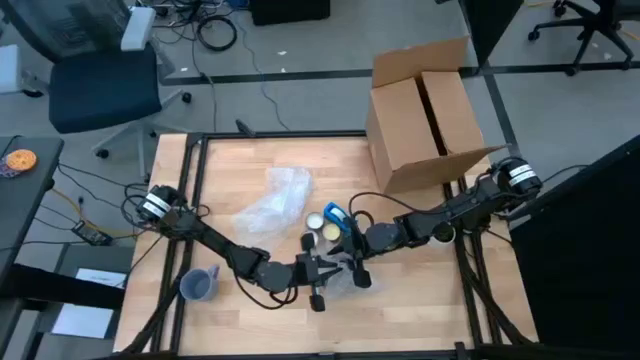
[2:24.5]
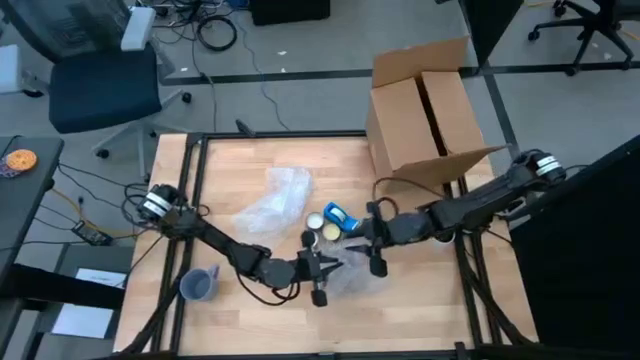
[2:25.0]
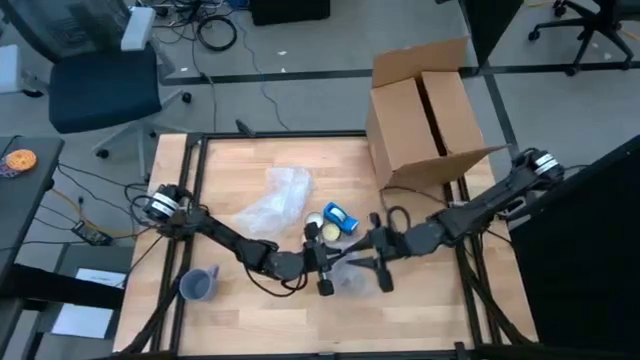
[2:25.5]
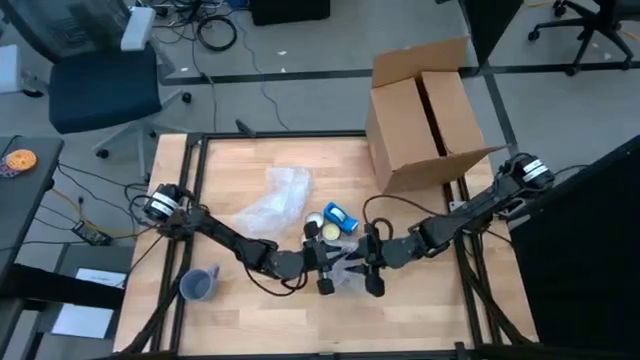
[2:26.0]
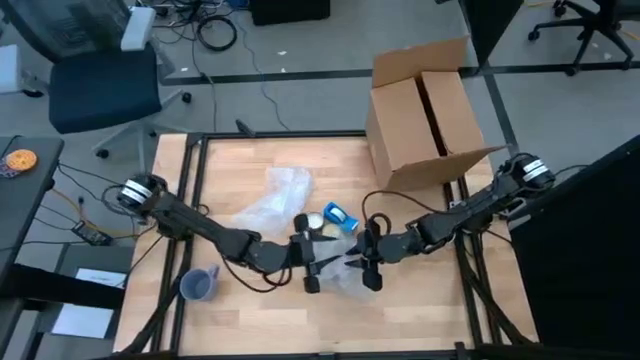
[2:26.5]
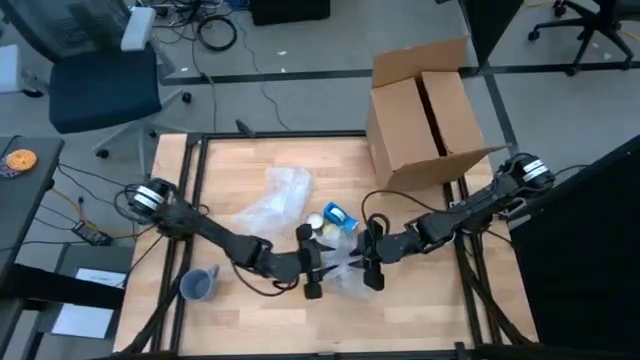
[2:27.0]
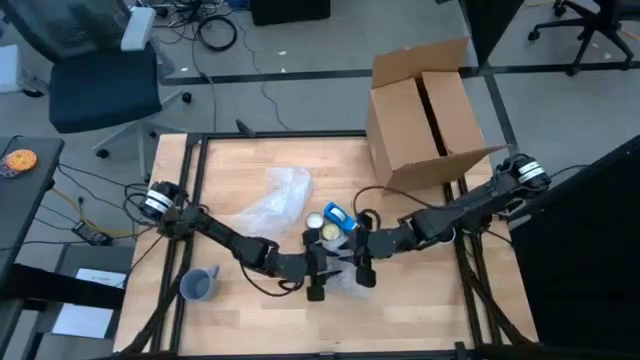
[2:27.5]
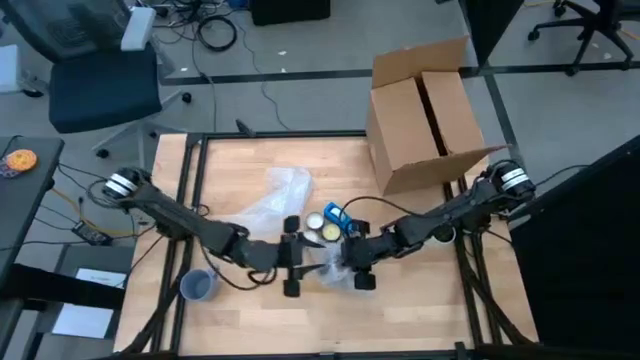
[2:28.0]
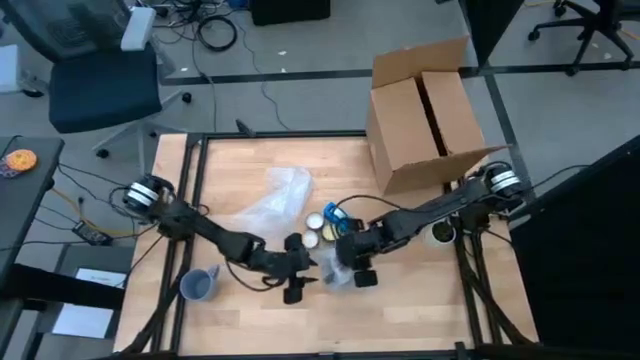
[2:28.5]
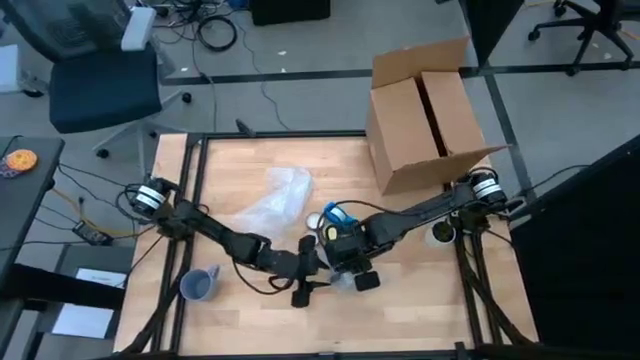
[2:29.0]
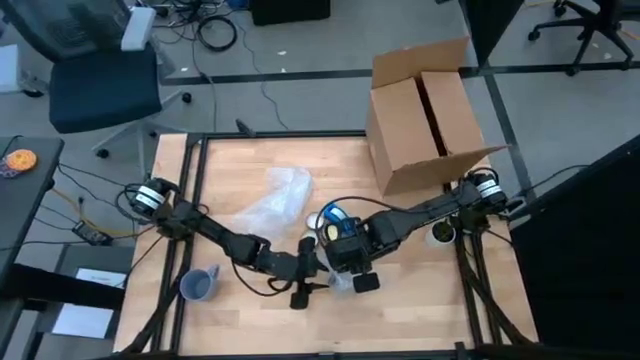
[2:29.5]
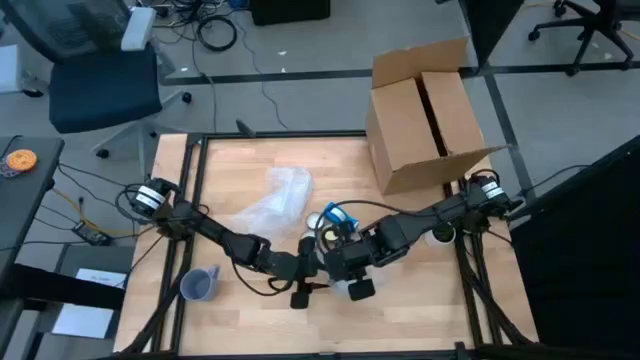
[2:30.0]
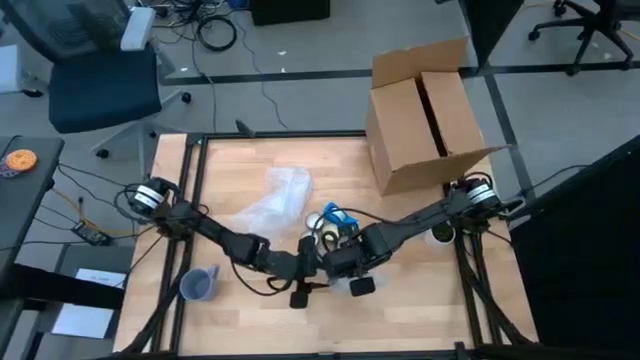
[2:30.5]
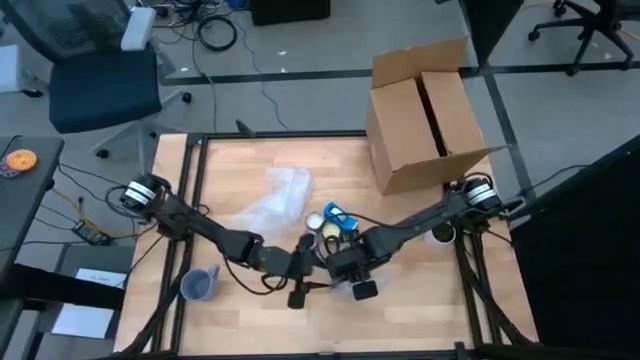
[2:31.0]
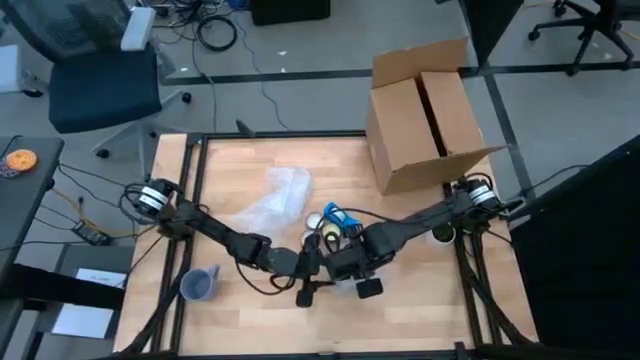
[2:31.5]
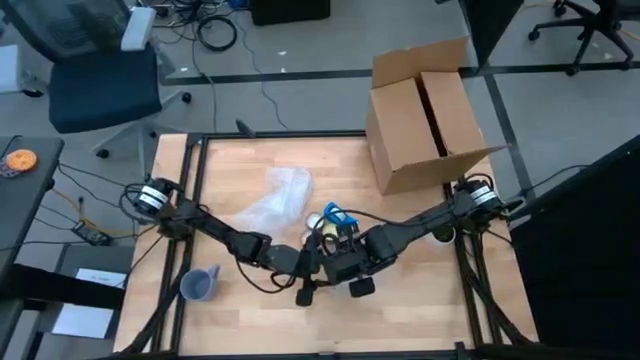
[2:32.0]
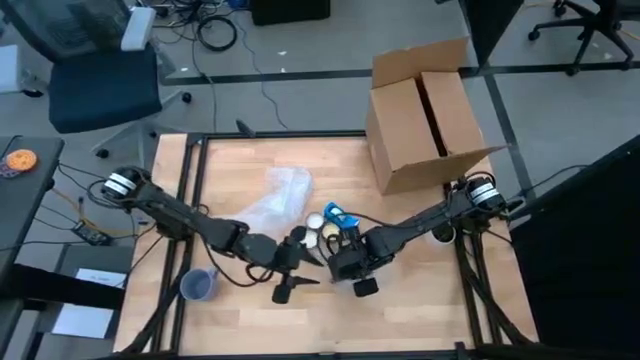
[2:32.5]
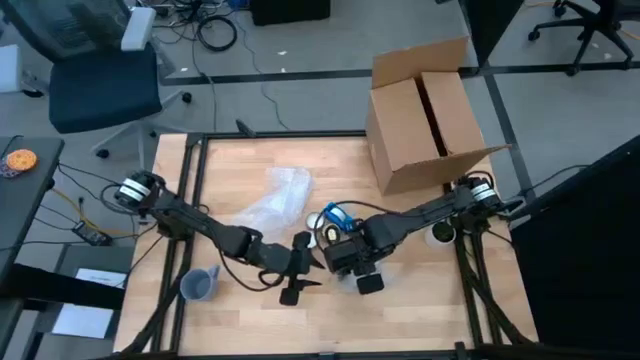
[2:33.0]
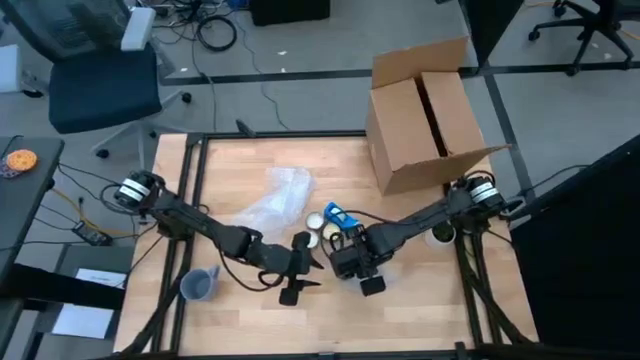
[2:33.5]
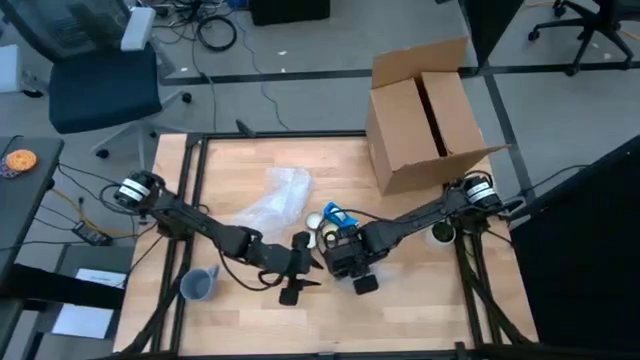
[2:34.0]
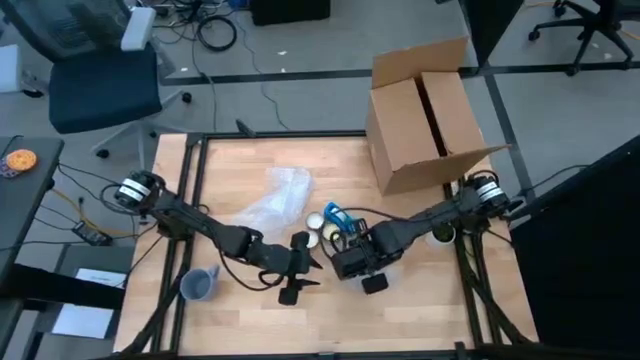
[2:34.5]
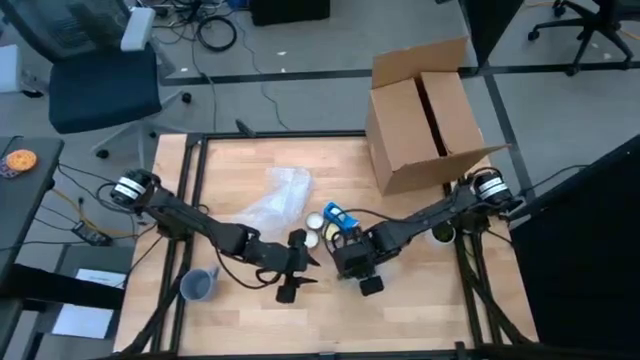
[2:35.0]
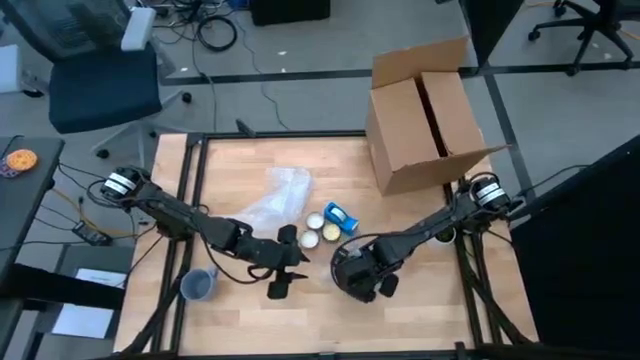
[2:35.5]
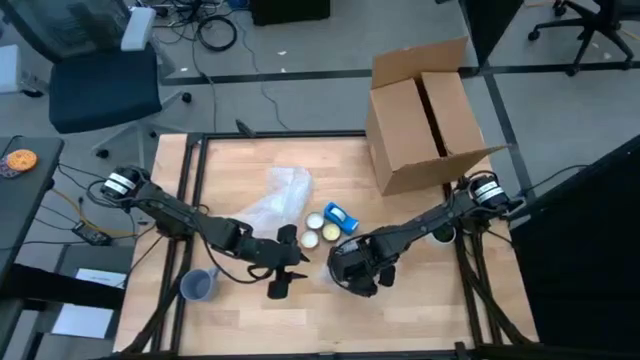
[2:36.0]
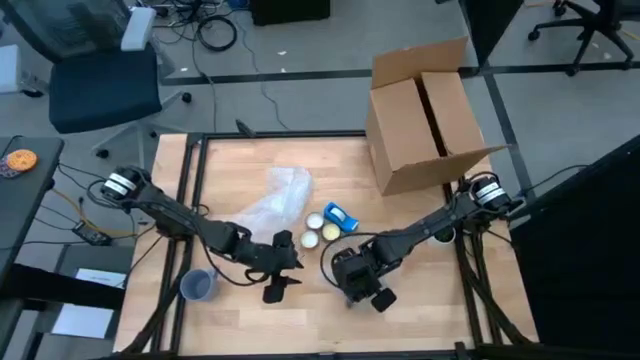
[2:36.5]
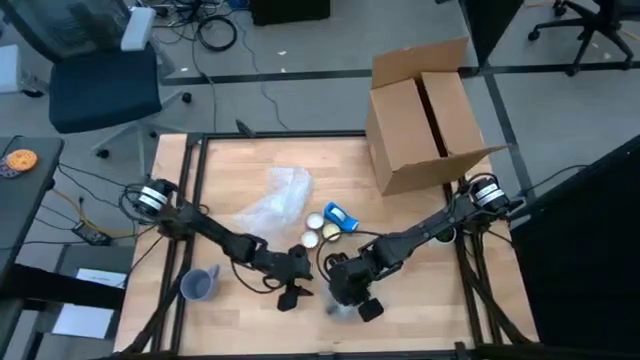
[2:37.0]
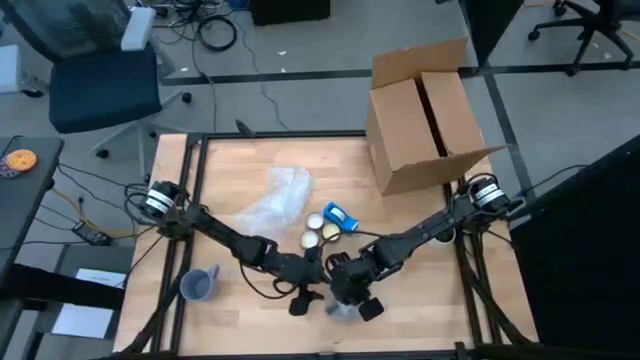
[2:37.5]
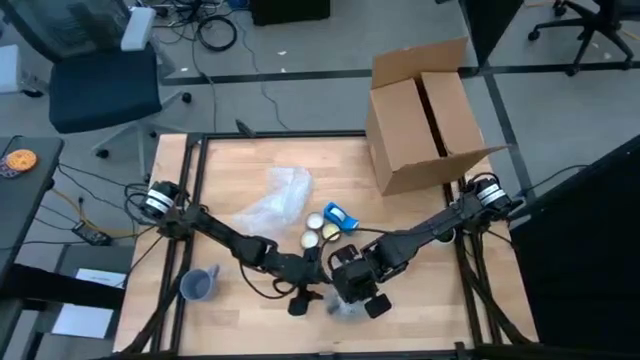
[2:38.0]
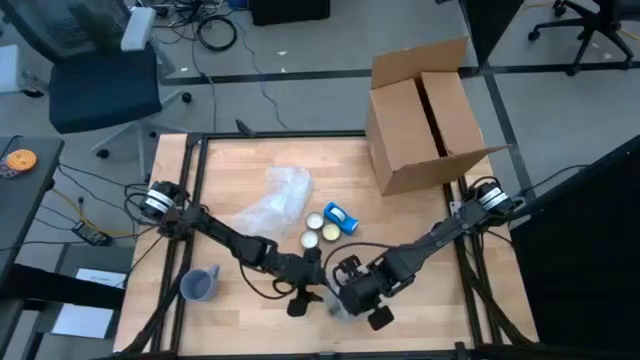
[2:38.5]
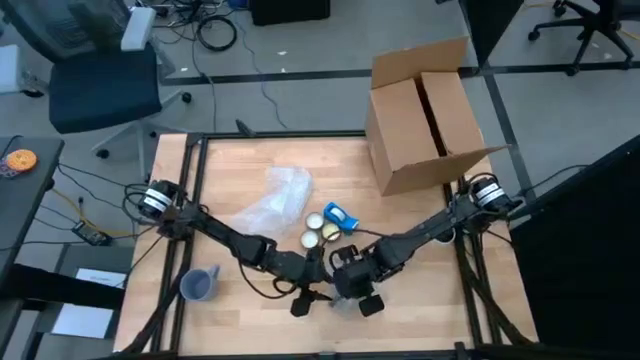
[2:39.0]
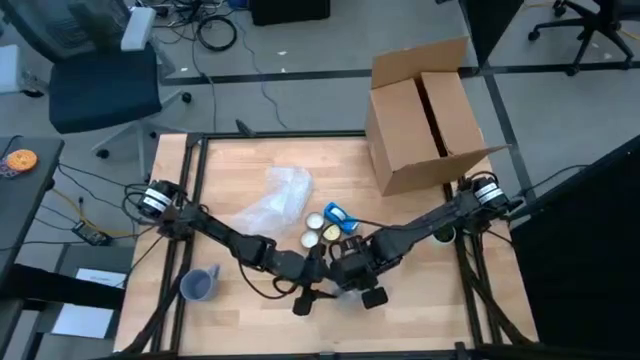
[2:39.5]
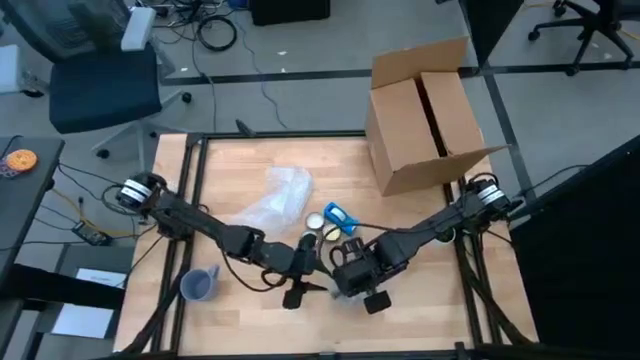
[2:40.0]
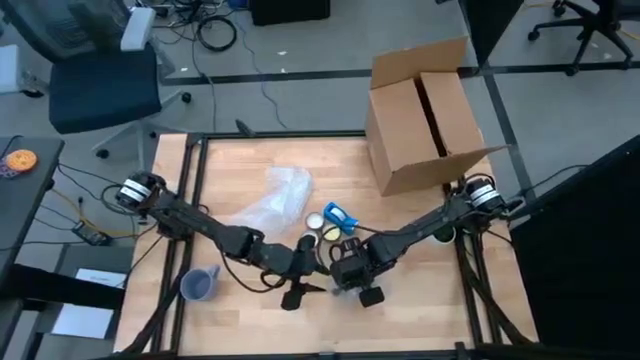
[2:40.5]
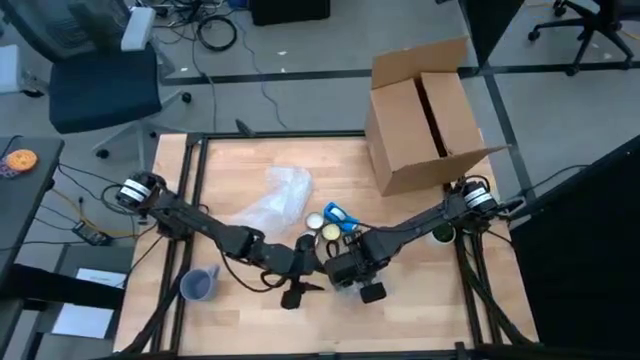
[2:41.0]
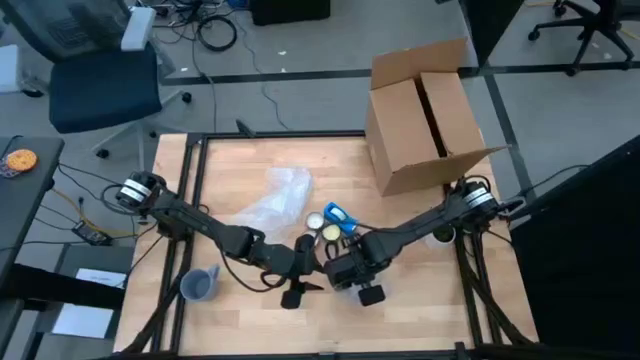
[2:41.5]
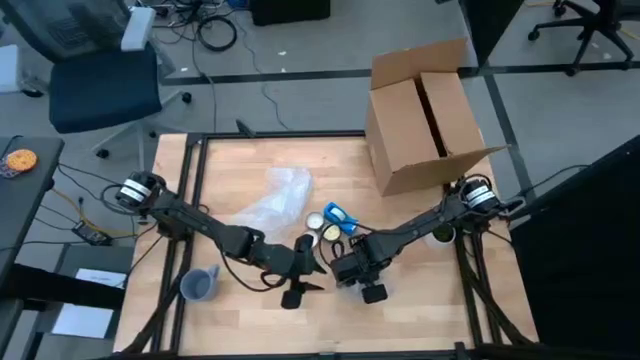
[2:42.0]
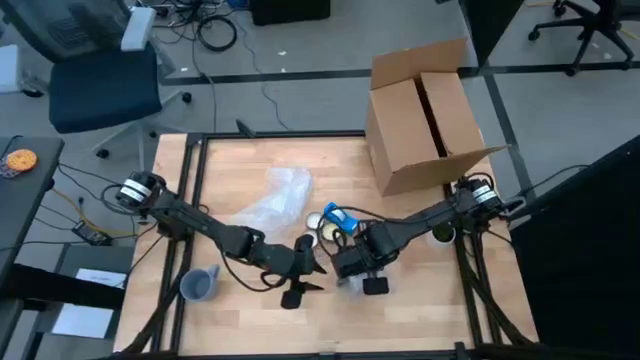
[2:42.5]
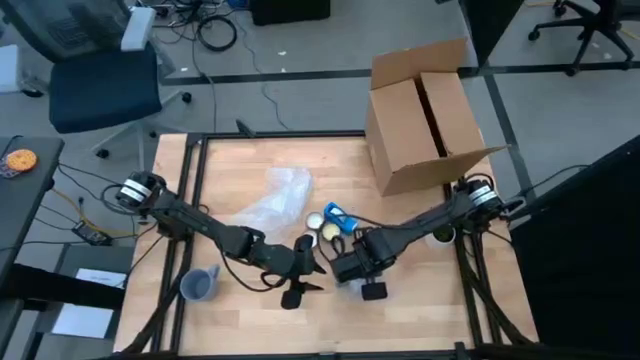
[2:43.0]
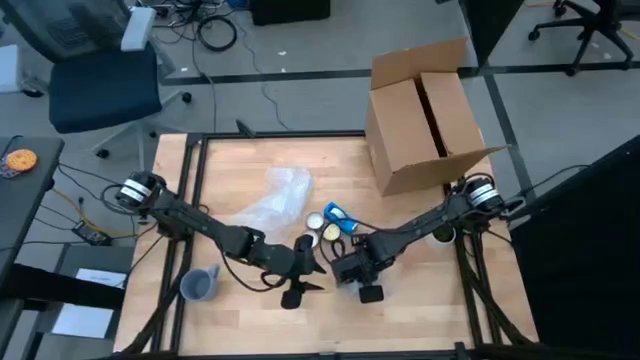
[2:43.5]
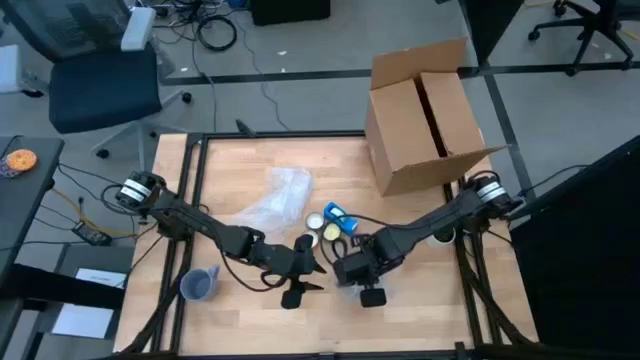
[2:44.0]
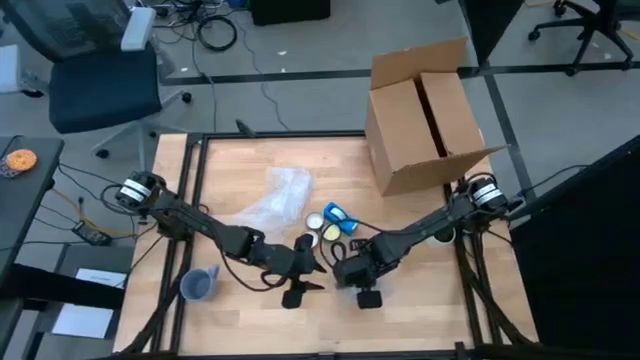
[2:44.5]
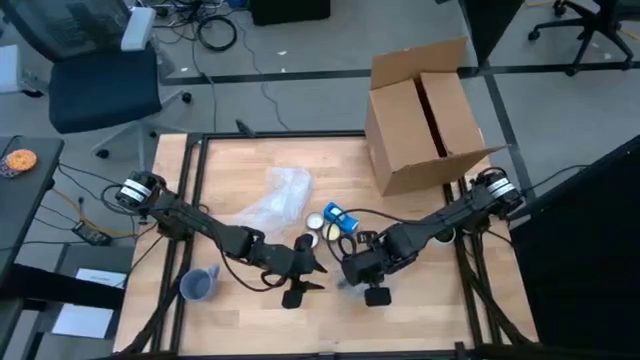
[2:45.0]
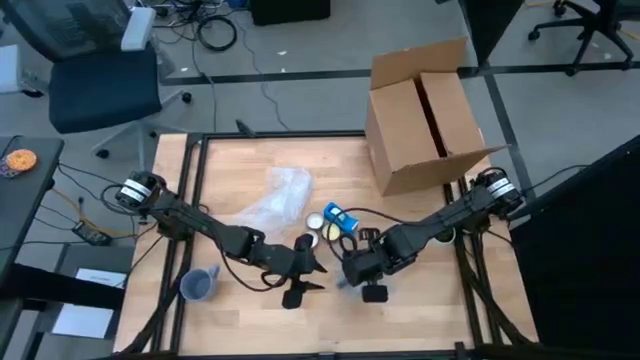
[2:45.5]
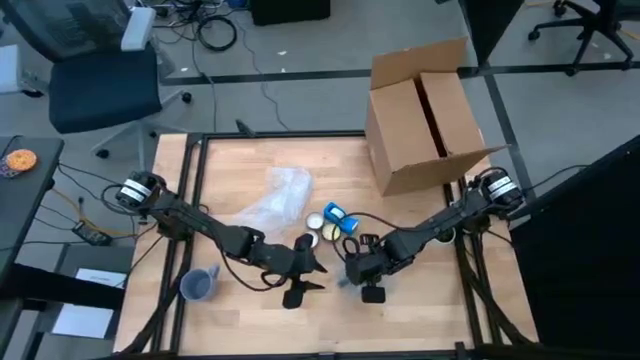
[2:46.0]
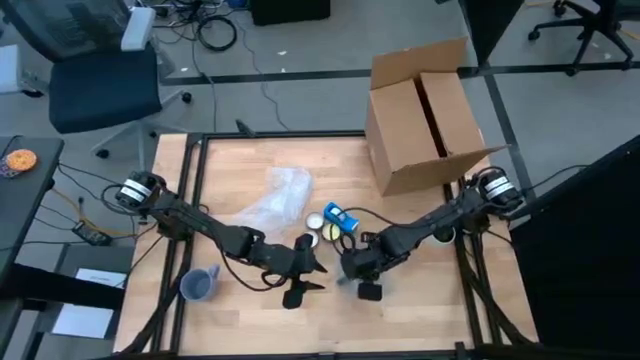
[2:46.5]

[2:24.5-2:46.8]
Task: wrap mug
Wrap the black mug with the transparent bubble wrap
